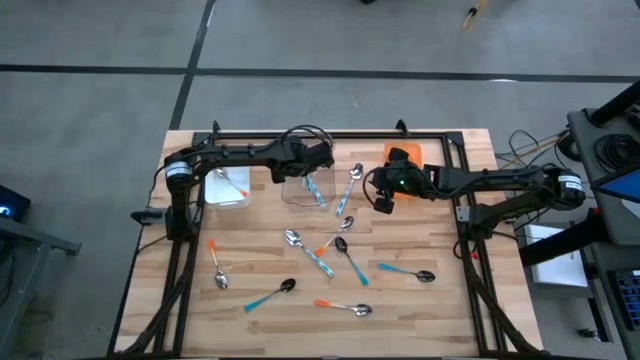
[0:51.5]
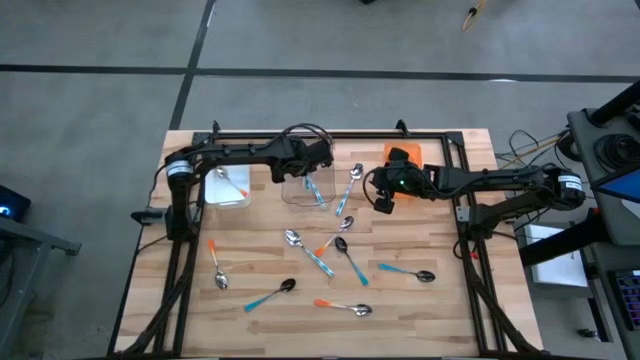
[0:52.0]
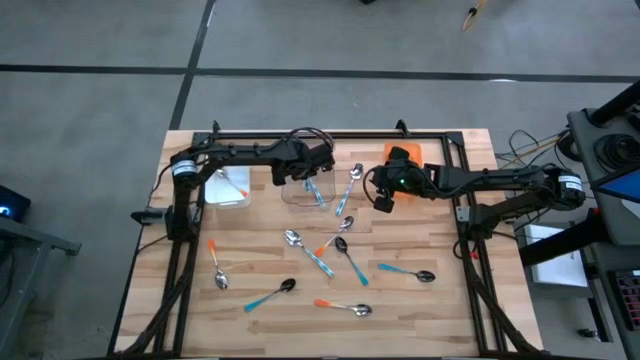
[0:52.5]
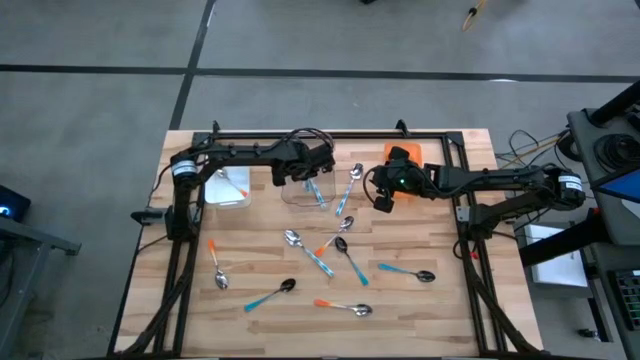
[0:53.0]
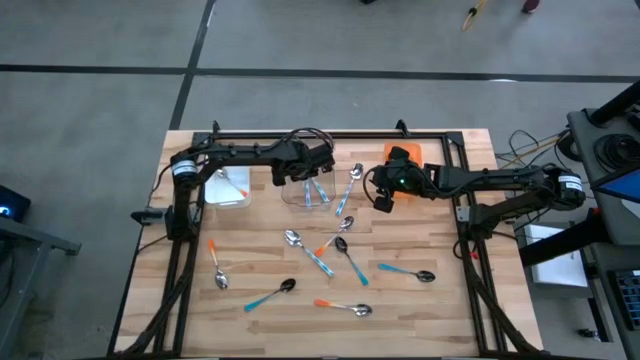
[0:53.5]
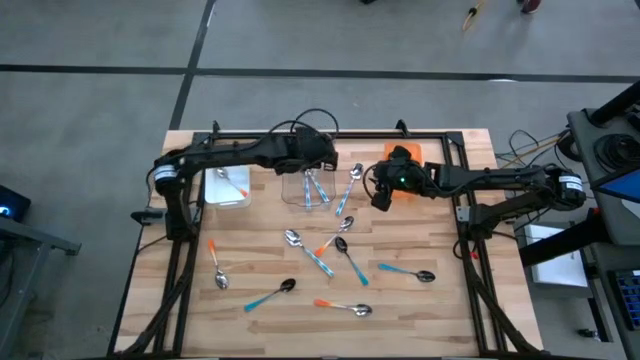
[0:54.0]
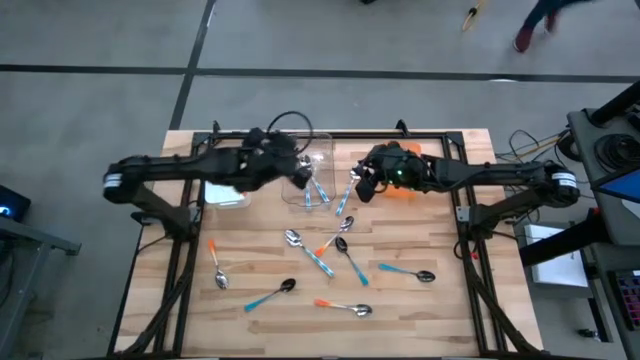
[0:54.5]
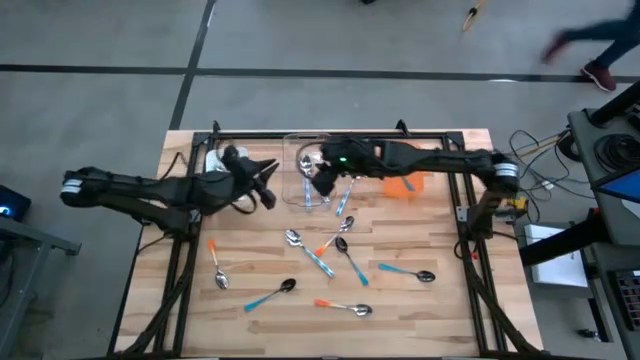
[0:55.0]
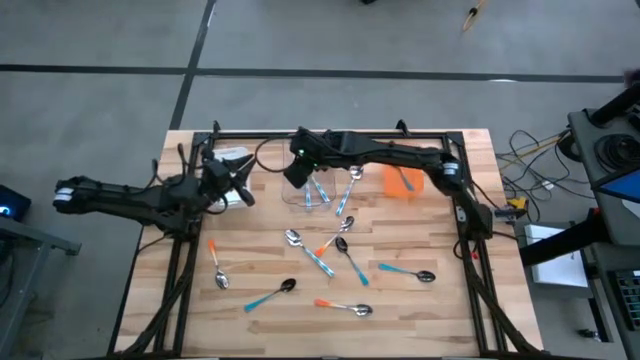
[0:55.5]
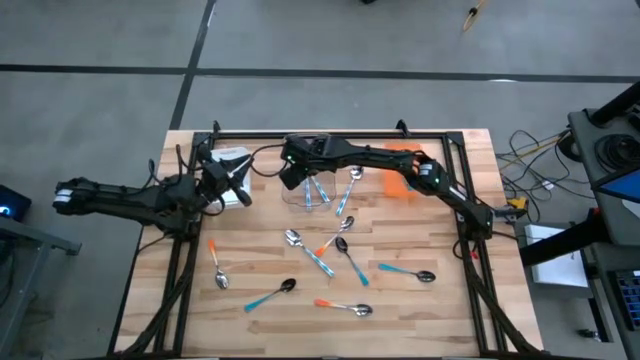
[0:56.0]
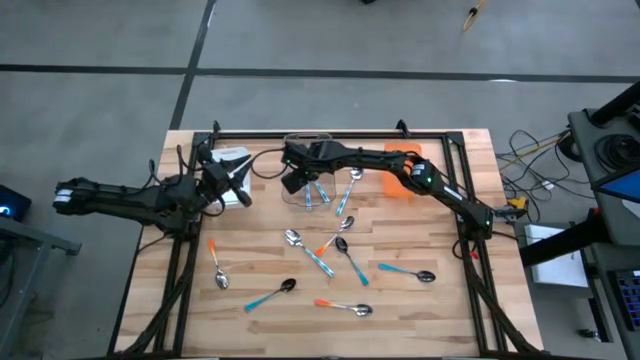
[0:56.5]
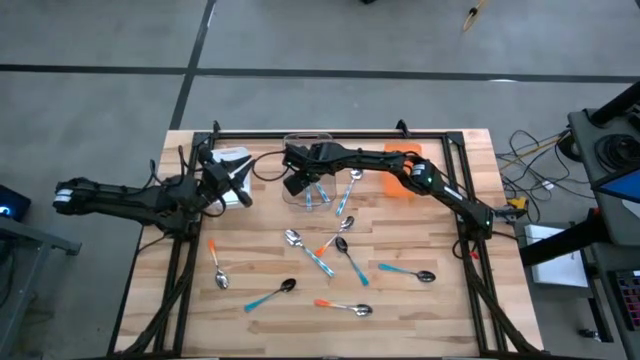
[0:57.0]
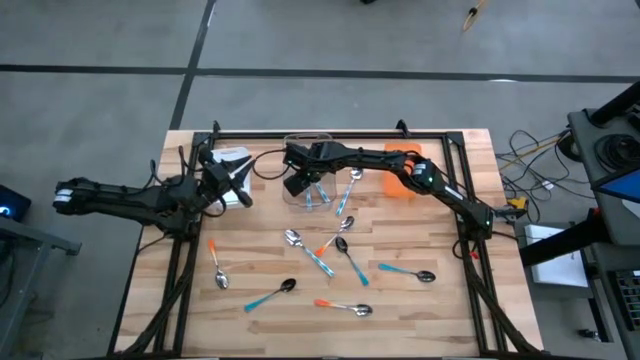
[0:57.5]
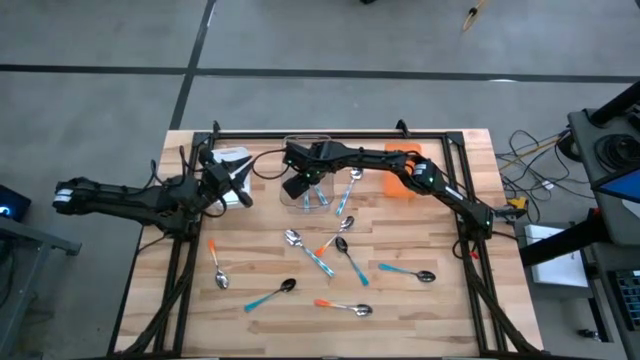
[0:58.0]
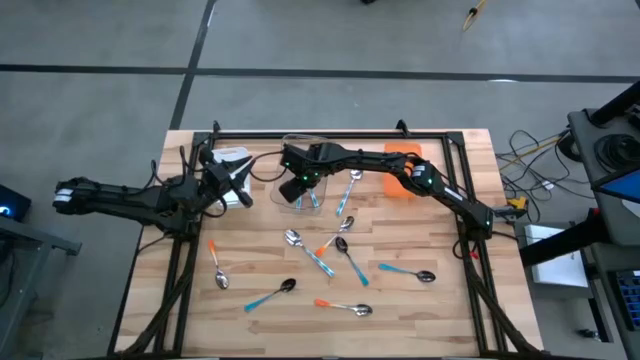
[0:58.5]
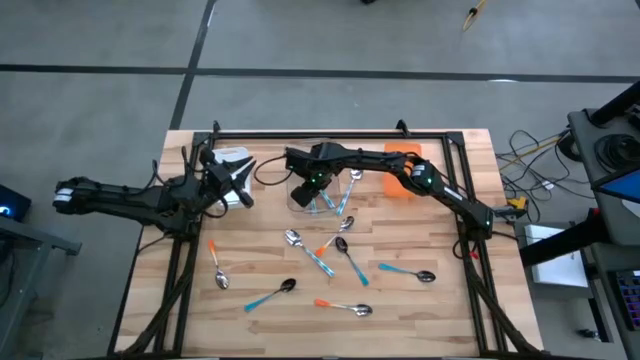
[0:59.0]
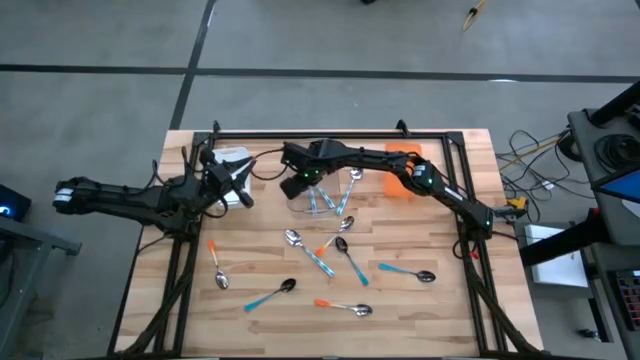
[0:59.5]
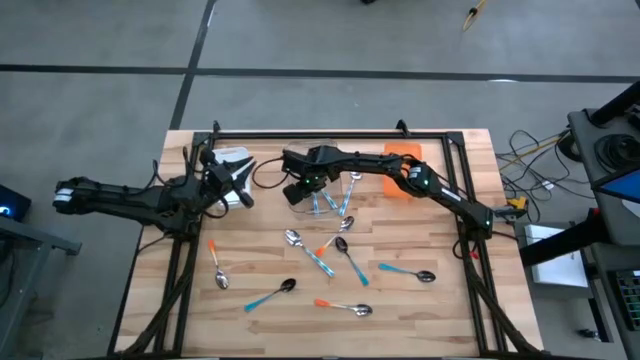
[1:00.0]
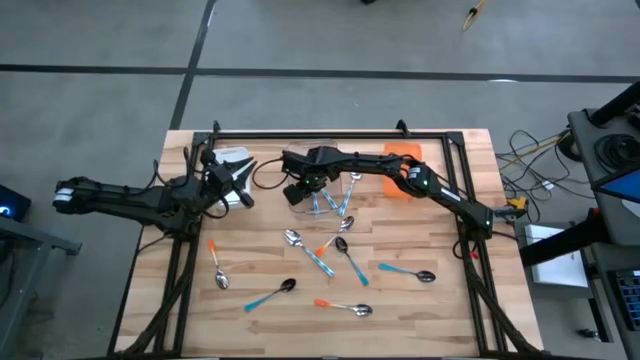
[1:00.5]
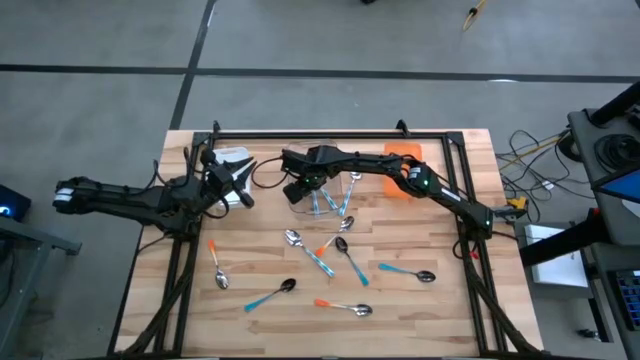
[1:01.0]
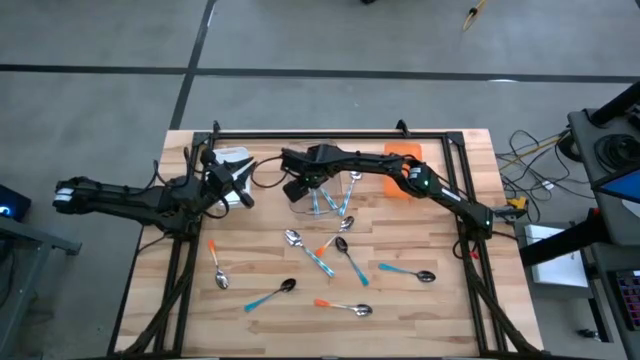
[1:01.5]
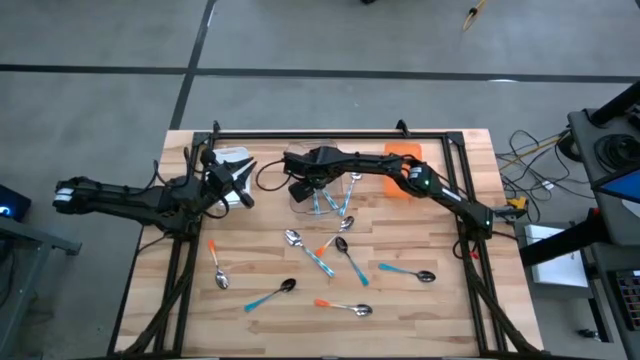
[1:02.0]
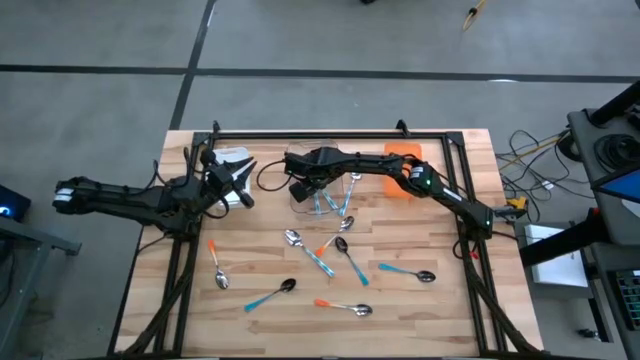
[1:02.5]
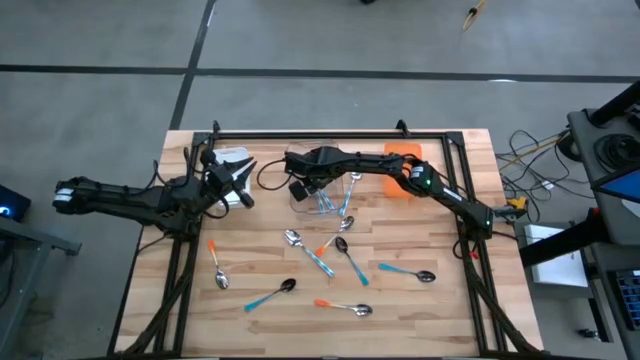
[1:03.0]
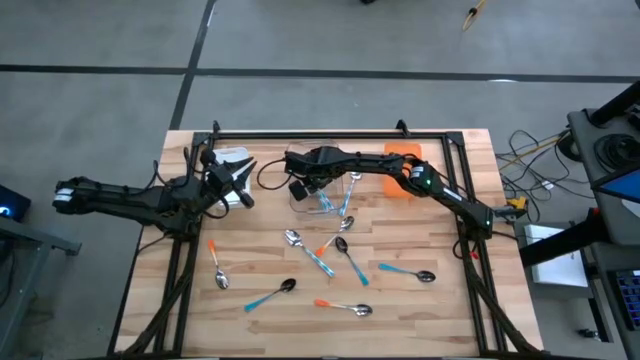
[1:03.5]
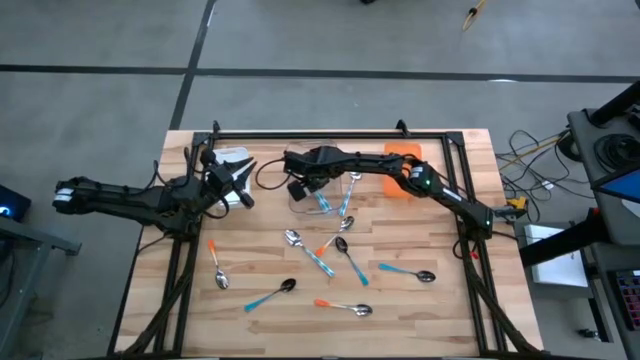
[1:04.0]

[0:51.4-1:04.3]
Task: Sort silverware by color (type)
Put the blue patterned spoon into the transparent bin

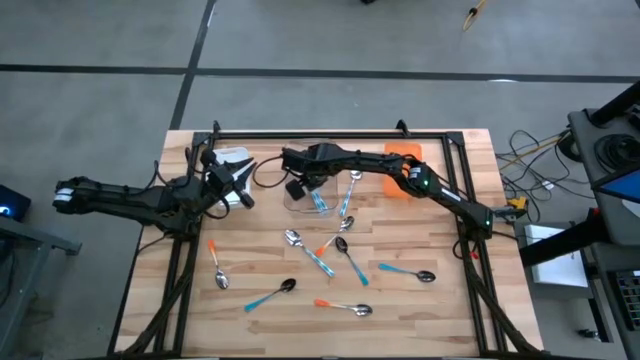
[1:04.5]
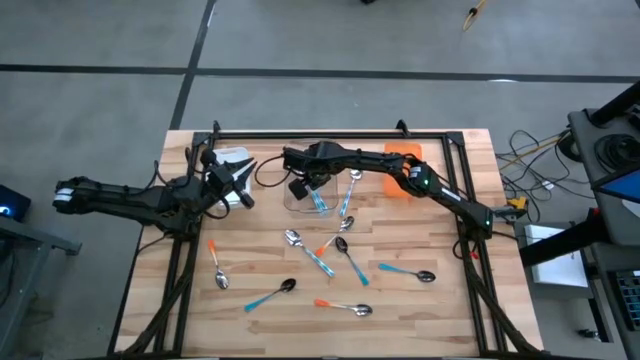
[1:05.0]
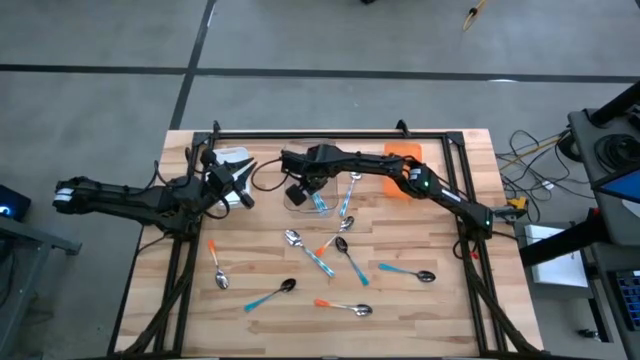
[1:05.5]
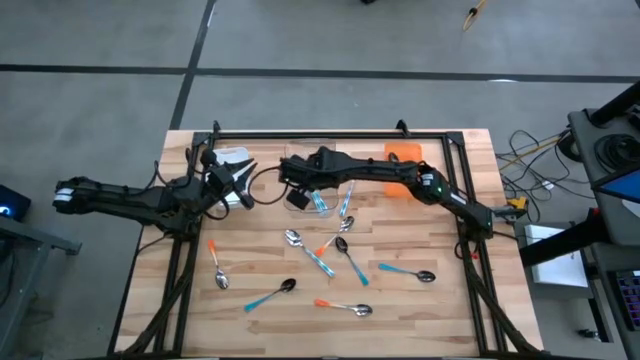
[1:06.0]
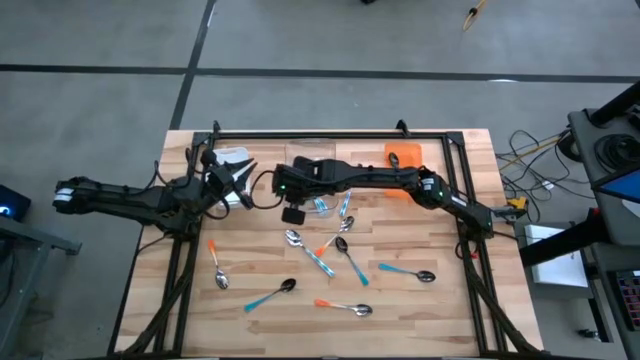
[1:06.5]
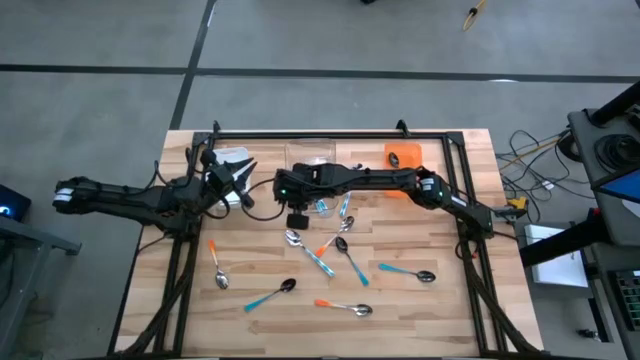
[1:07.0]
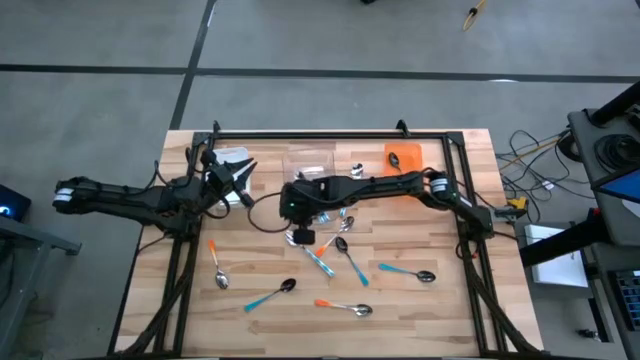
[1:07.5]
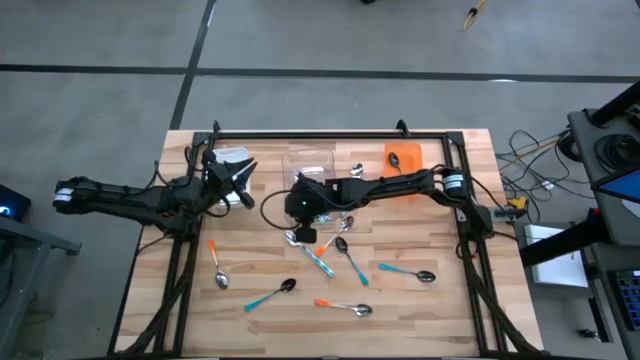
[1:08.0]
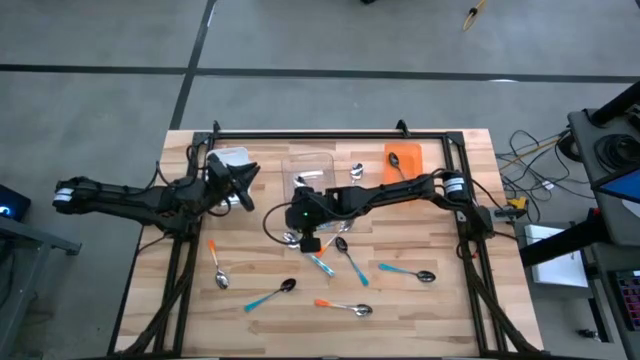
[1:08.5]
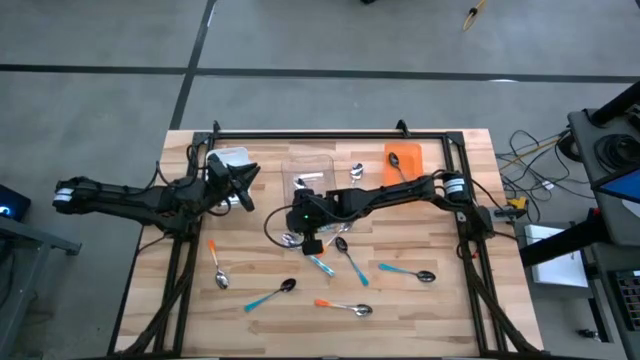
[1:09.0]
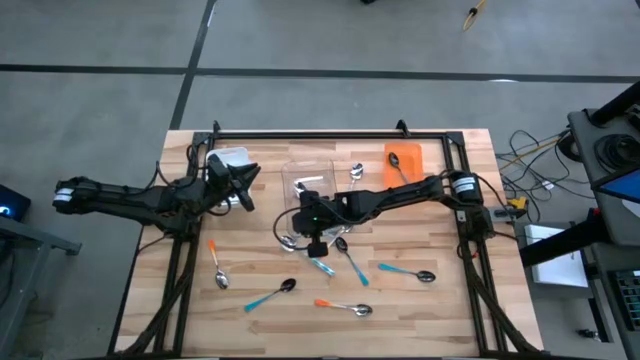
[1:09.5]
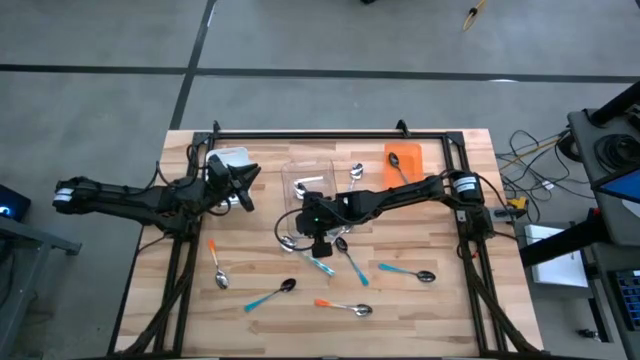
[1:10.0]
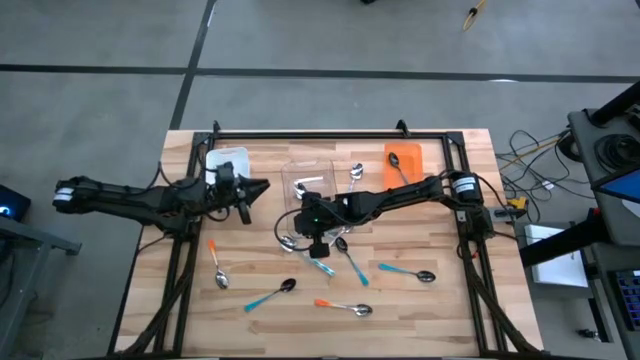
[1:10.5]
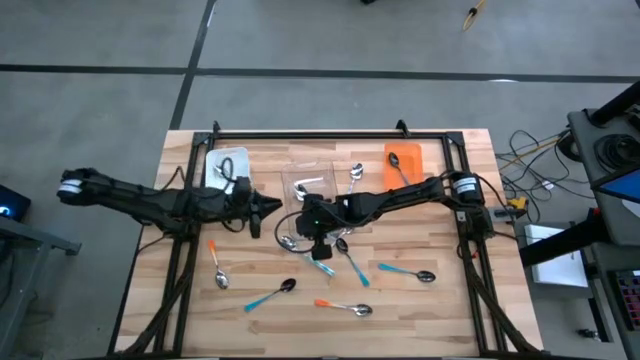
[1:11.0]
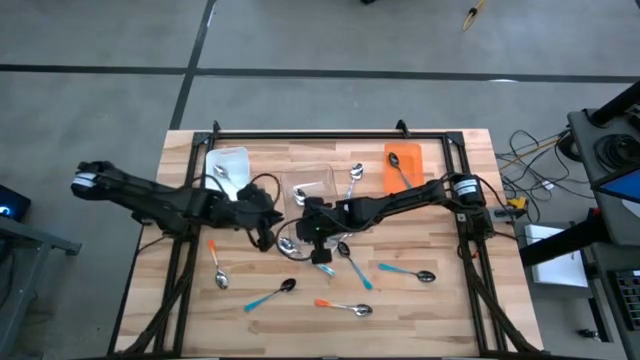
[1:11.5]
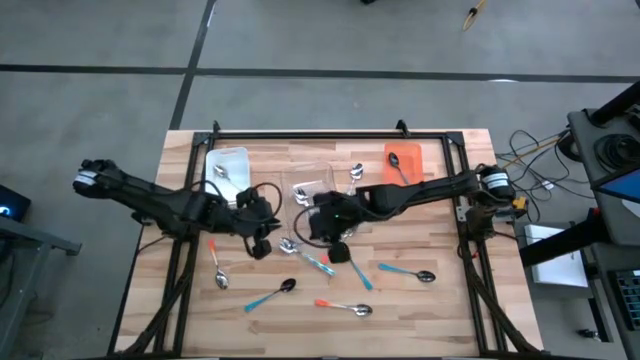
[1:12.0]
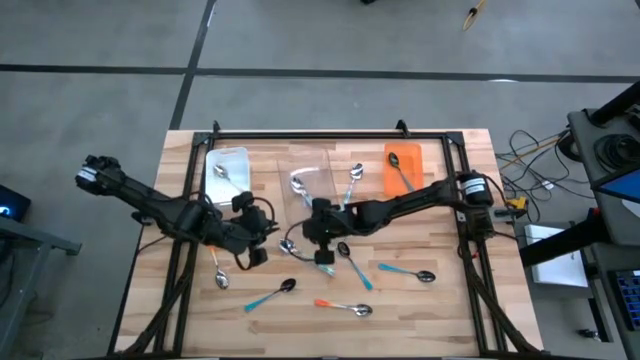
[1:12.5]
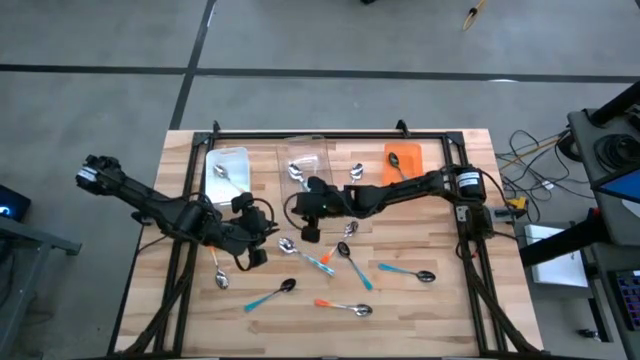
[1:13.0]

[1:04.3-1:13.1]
Adjust the transparent bin
